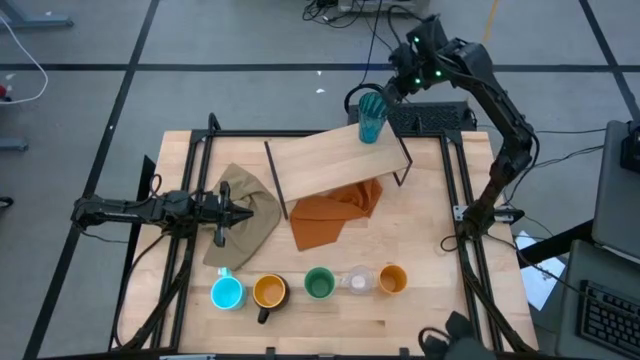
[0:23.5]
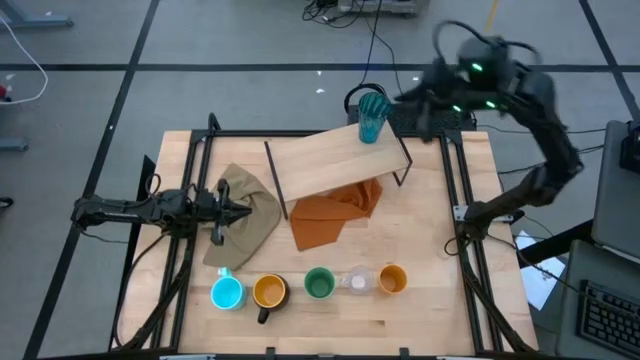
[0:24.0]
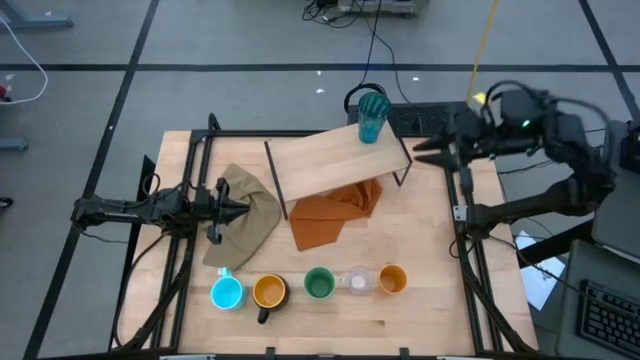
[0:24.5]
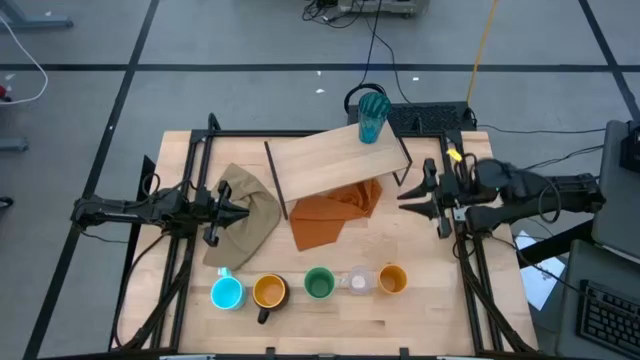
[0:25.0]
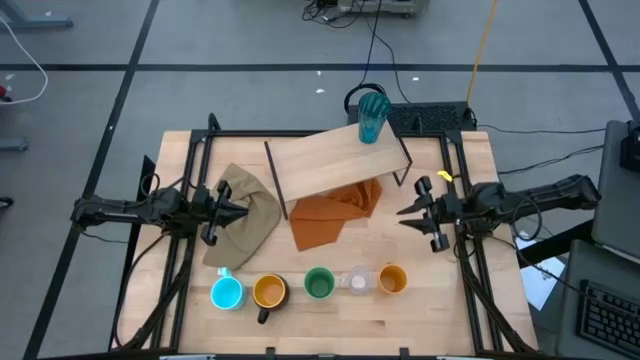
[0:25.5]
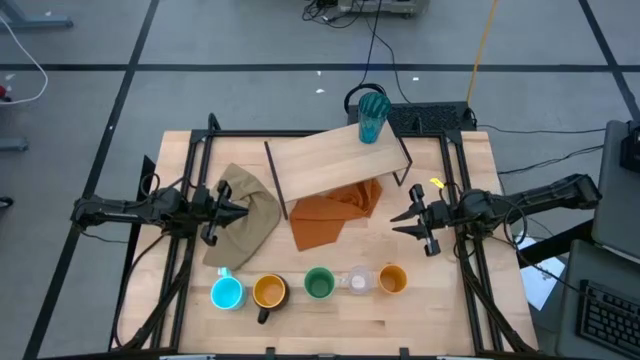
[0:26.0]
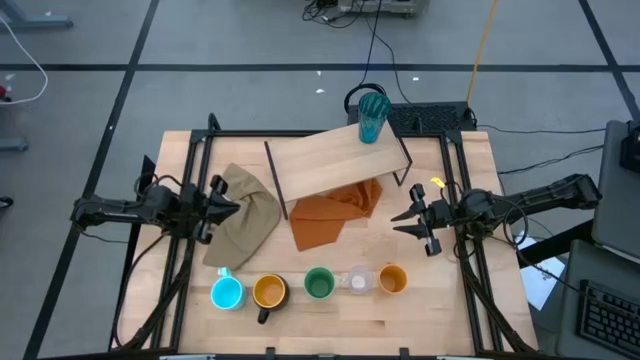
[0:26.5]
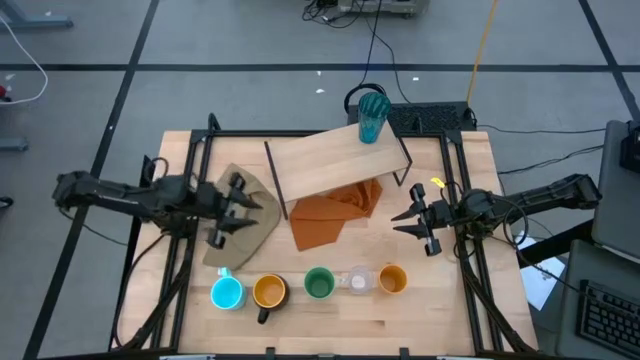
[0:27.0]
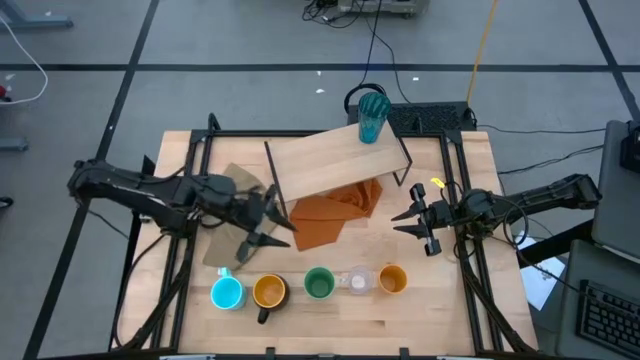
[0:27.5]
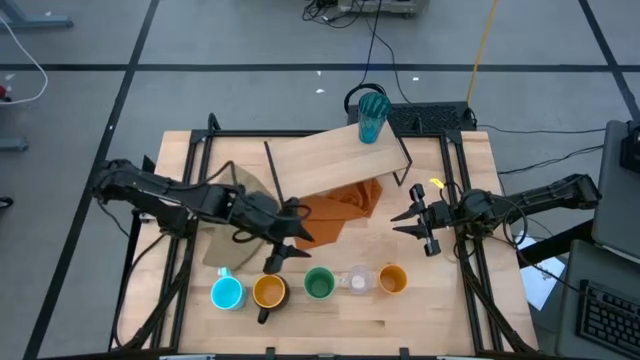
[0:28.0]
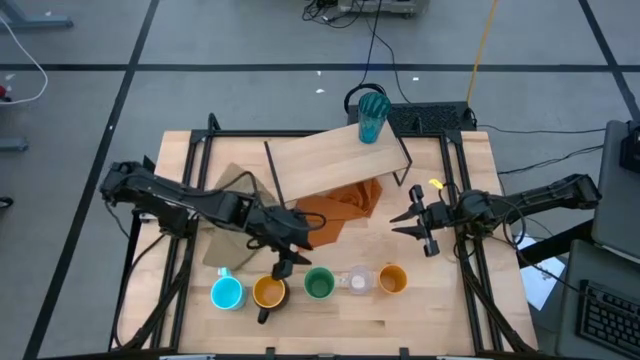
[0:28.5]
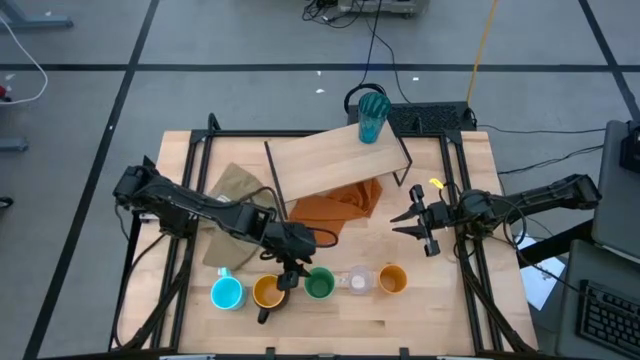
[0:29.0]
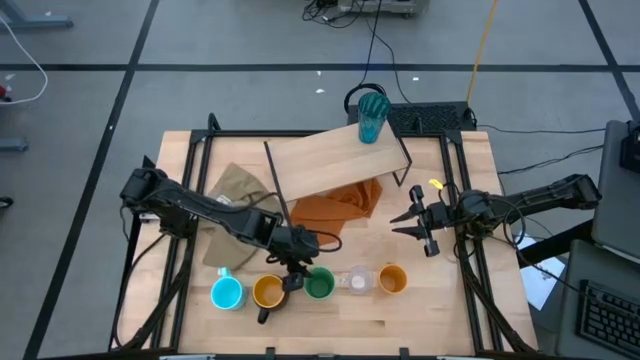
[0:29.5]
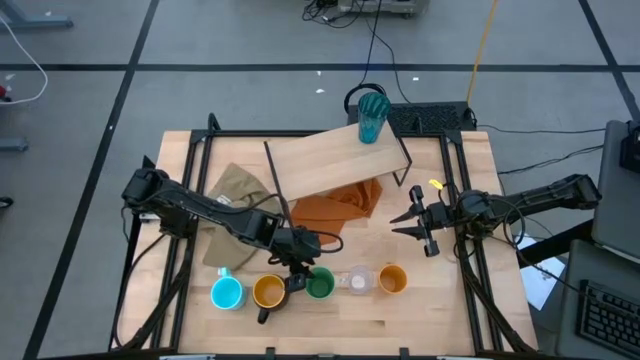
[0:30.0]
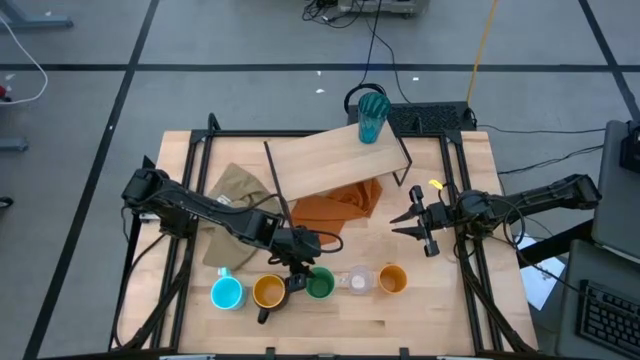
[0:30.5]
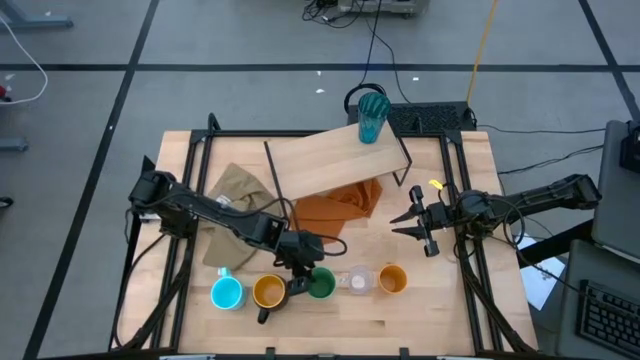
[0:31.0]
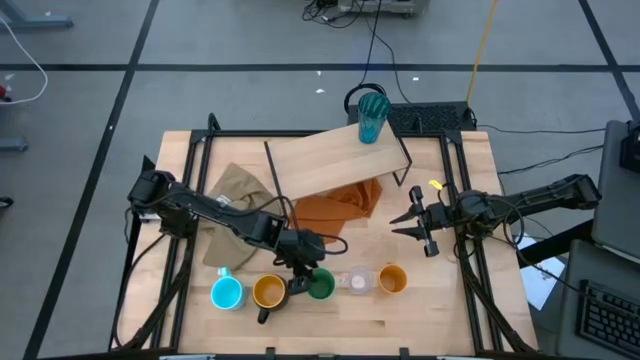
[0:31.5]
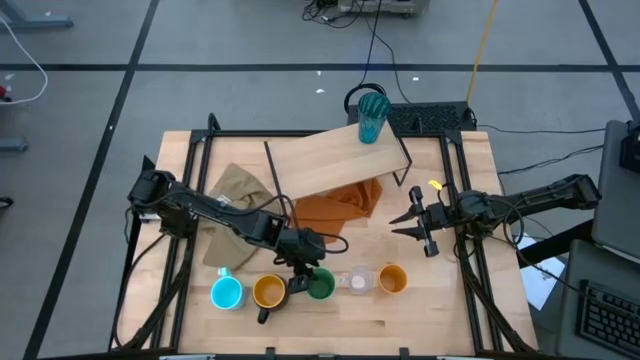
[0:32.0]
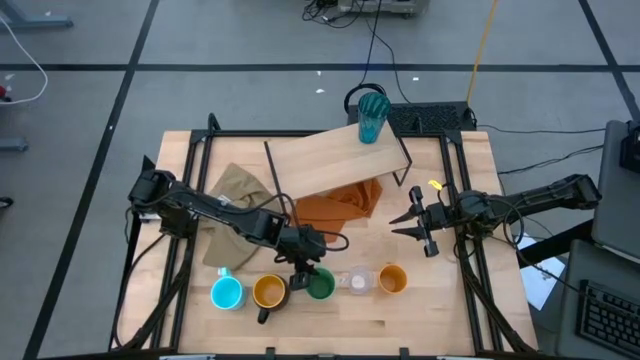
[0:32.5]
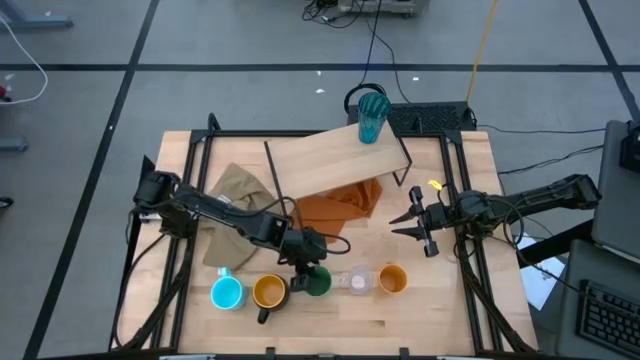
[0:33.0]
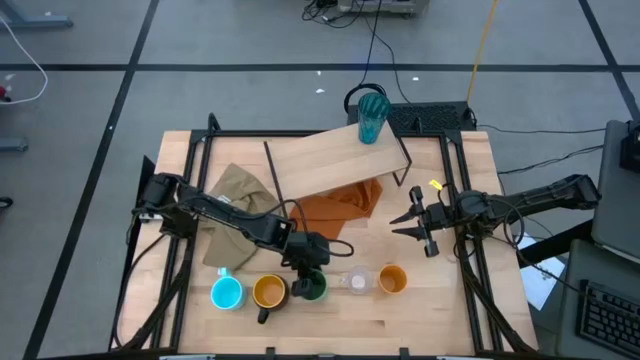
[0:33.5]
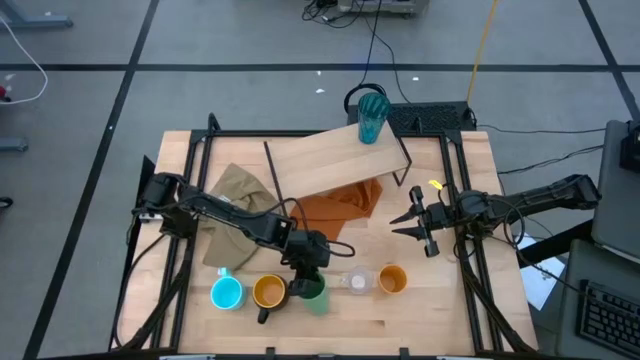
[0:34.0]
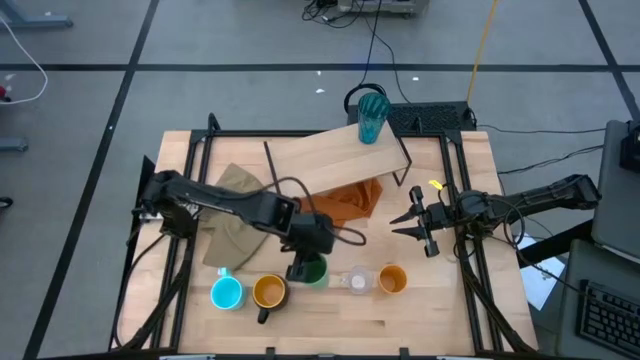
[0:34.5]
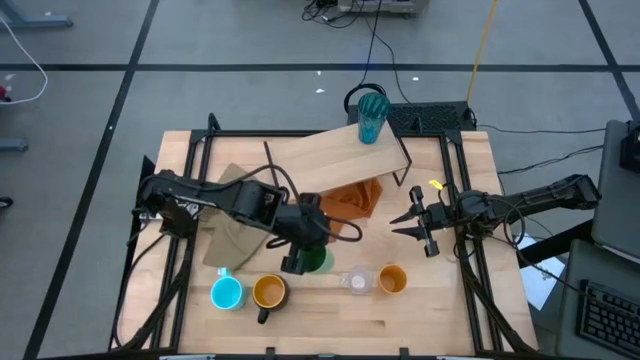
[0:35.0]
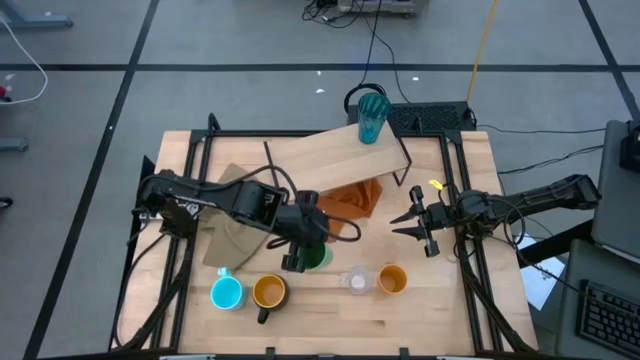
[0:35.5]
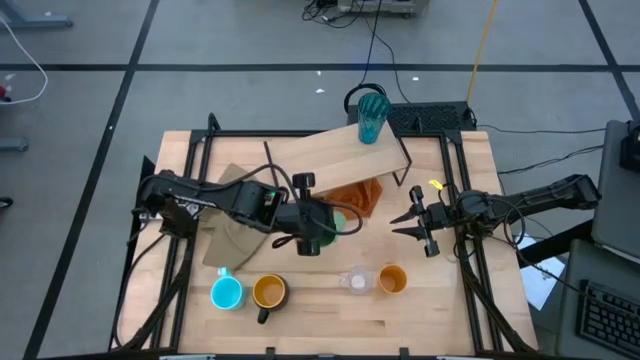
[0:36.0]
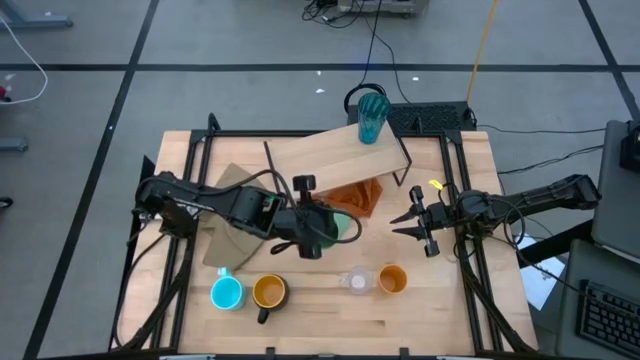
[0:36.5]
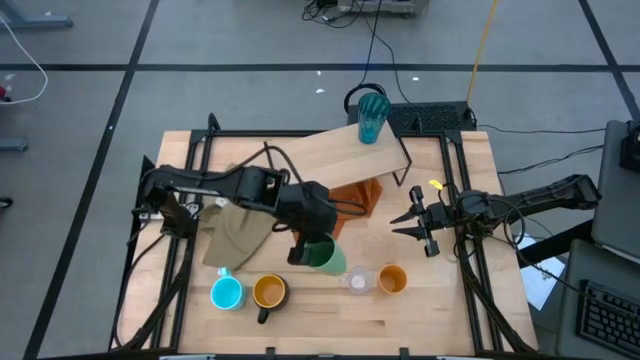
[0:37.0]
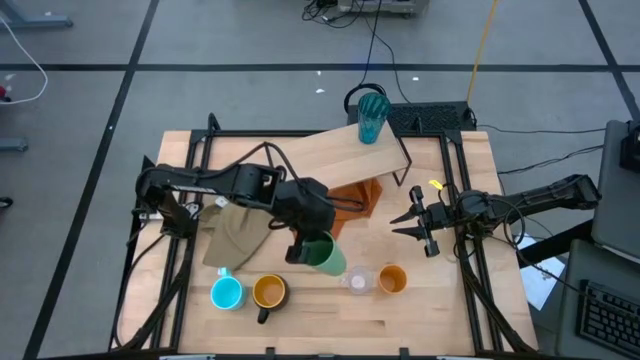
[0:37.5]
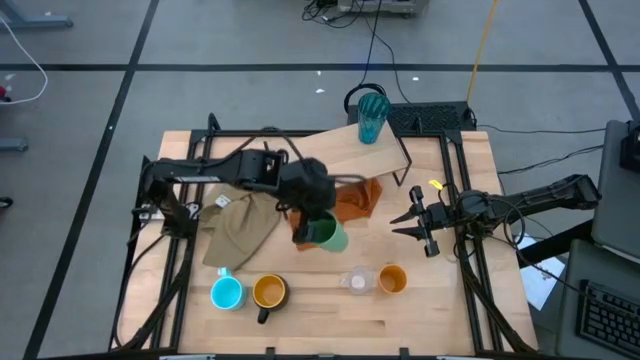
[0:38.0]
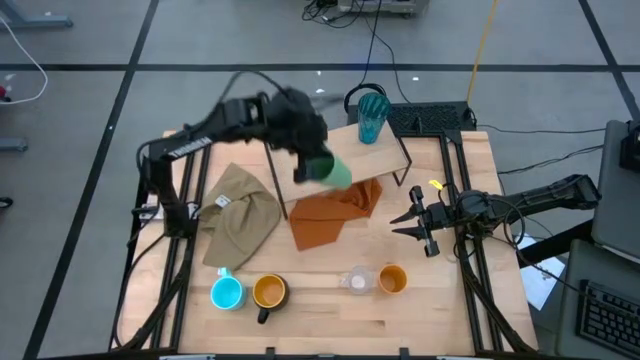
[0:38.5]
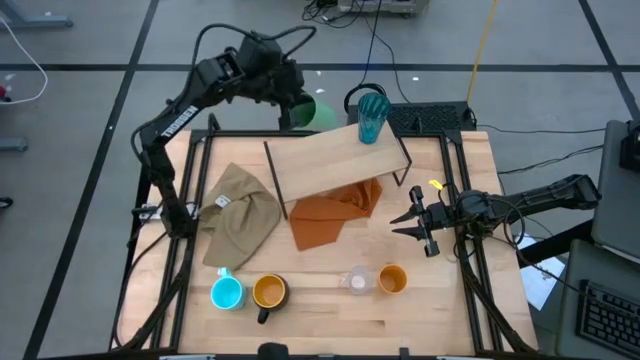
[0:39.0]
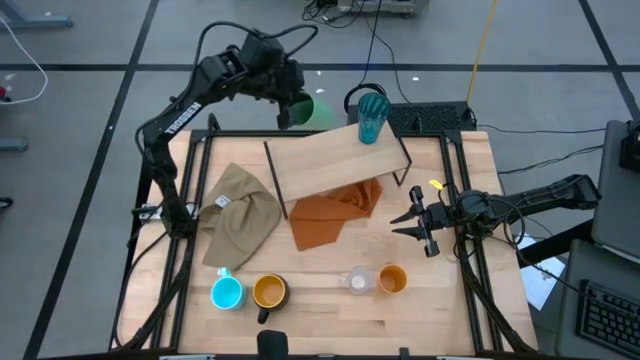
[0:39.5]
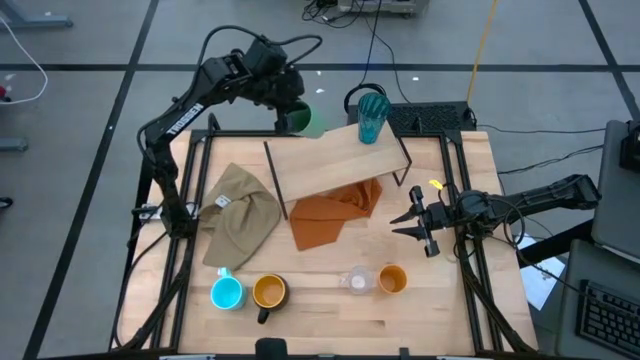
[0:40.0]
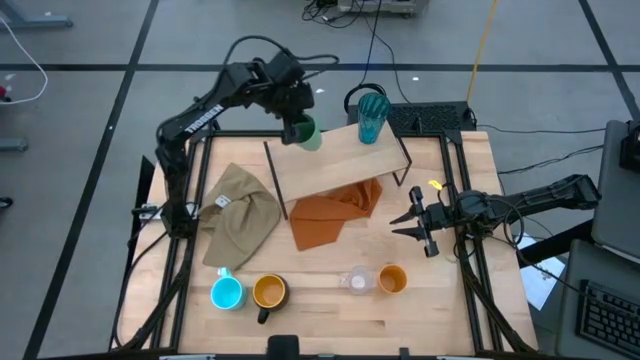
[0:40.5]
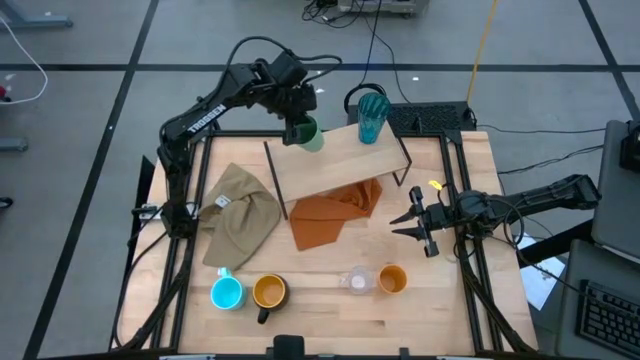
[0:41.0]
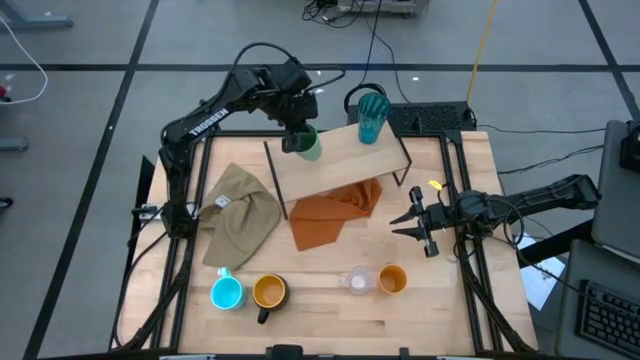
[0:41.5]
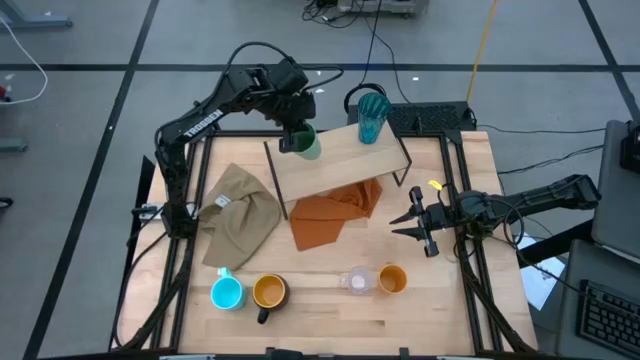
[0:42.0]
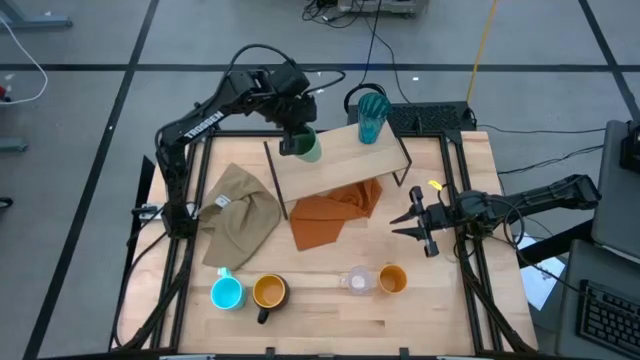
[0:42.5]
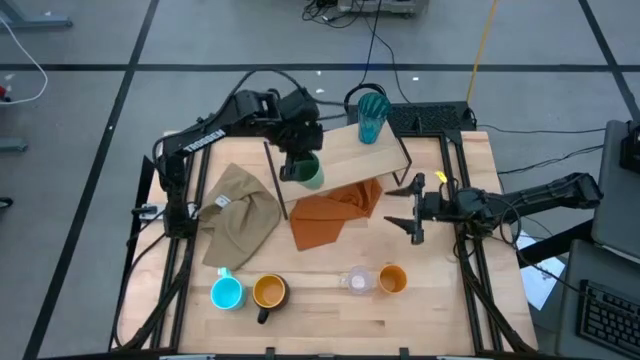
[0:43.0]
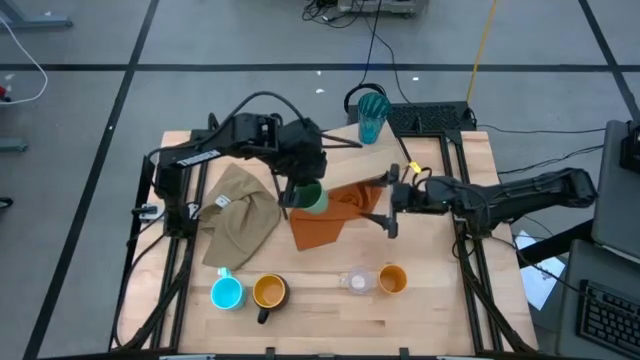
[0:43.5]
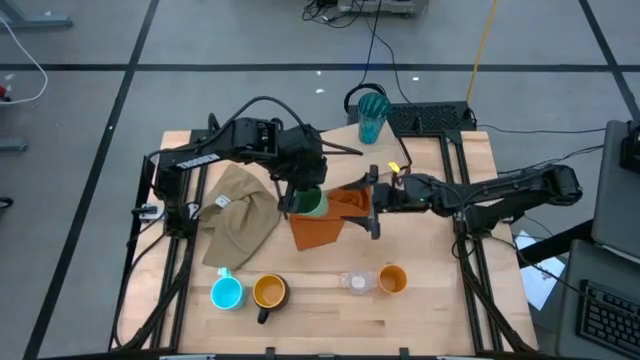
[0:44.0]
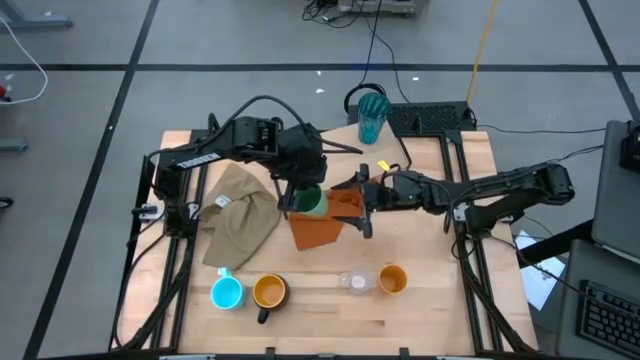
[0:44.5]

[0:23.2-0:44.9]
Task: Stack small to large cups/mugs on shelf
Put the green cup on the shelf
